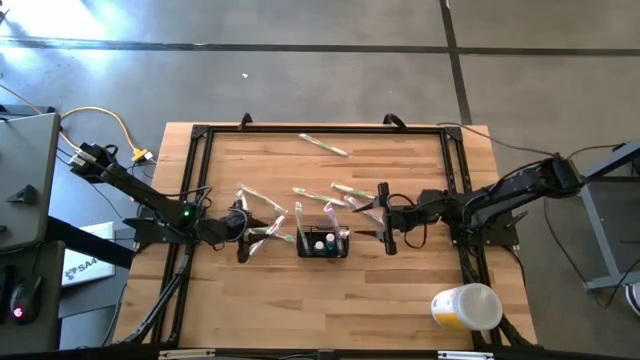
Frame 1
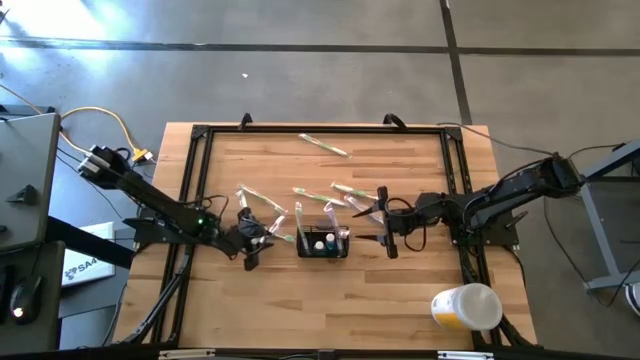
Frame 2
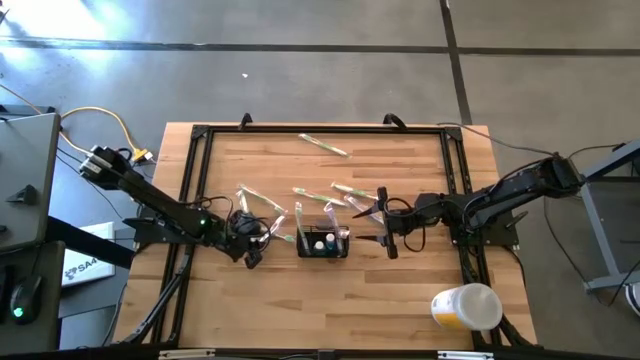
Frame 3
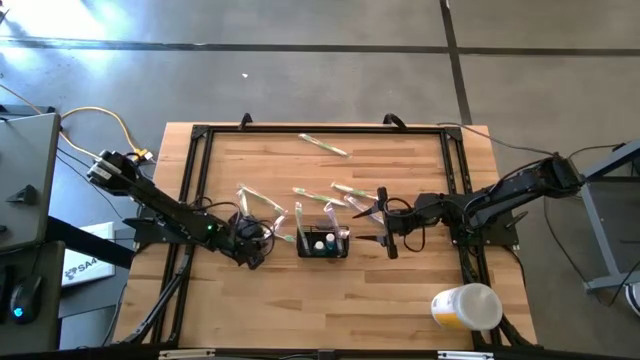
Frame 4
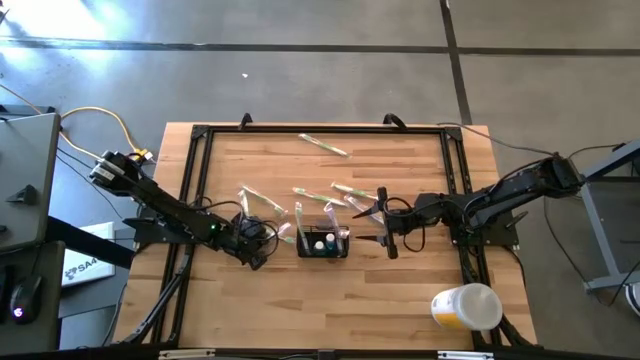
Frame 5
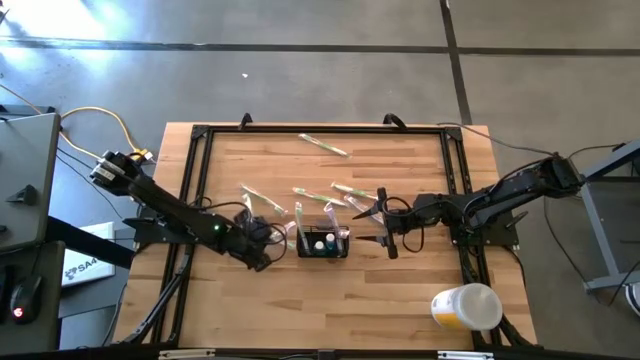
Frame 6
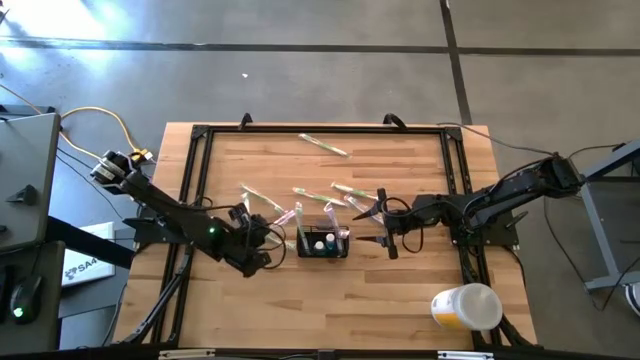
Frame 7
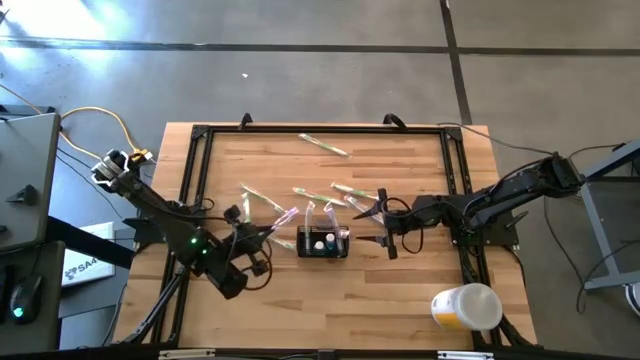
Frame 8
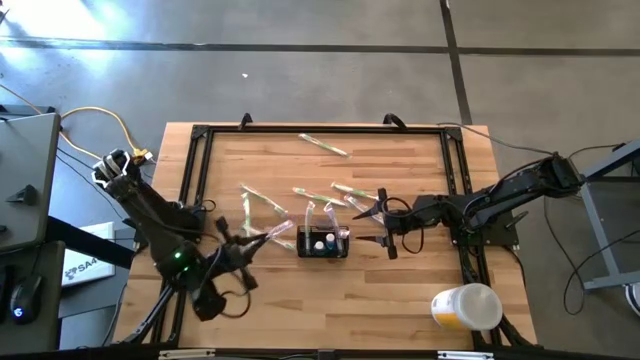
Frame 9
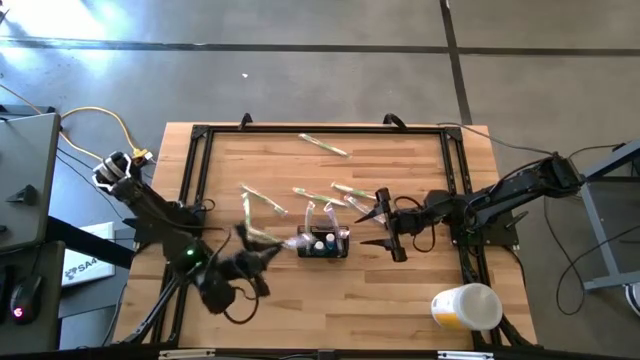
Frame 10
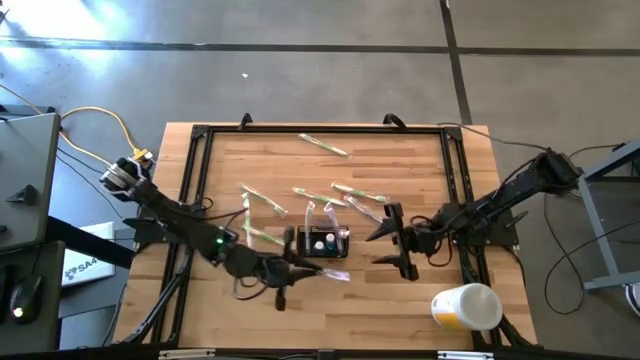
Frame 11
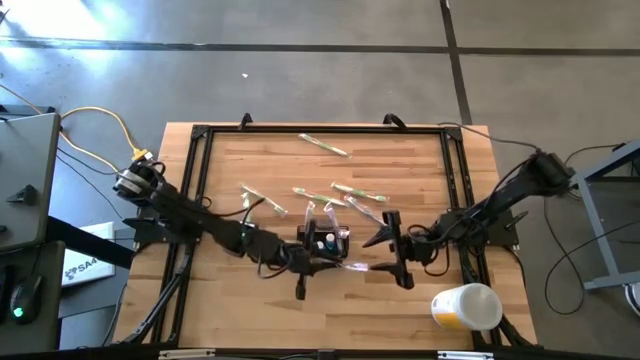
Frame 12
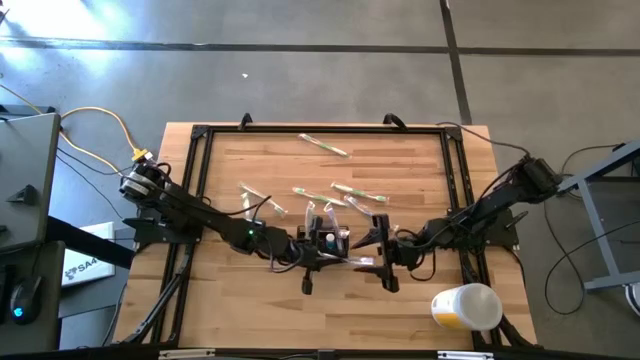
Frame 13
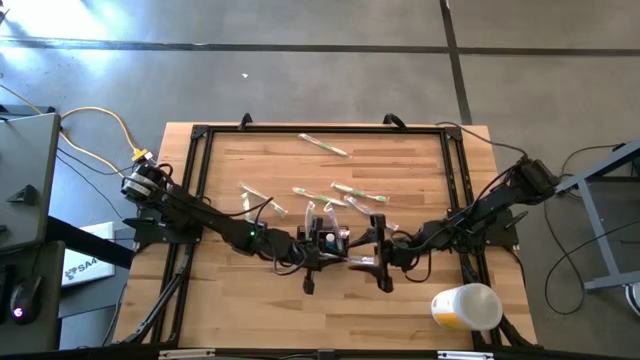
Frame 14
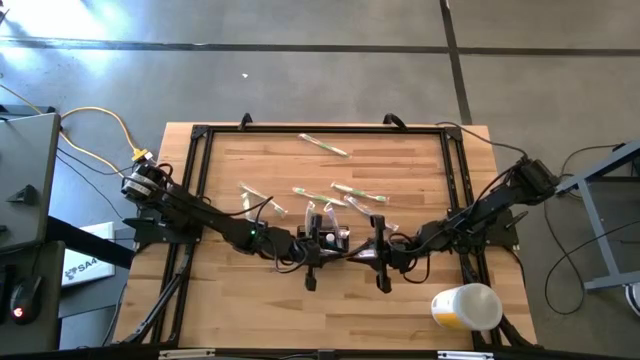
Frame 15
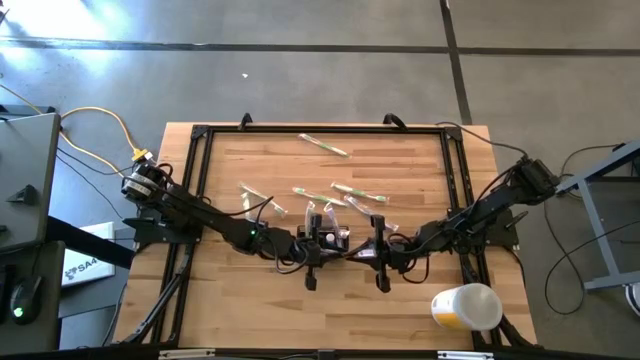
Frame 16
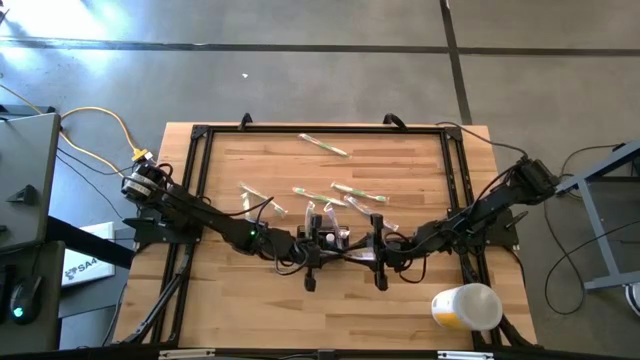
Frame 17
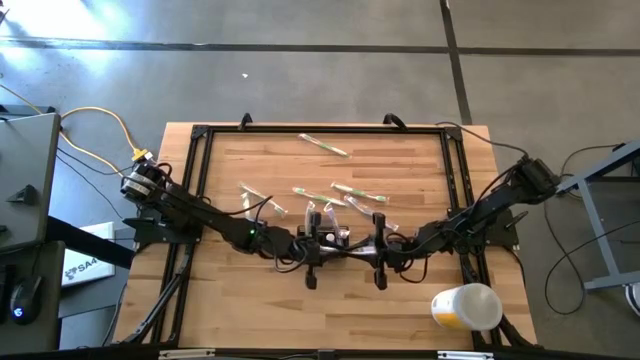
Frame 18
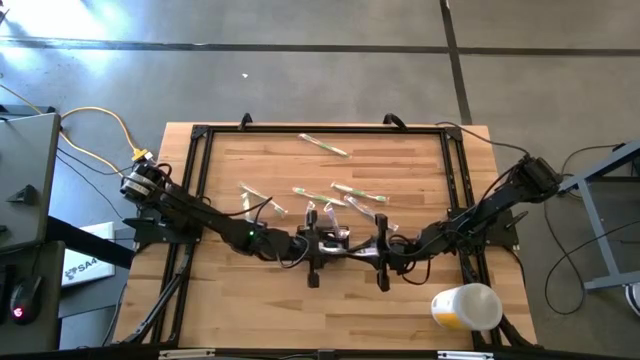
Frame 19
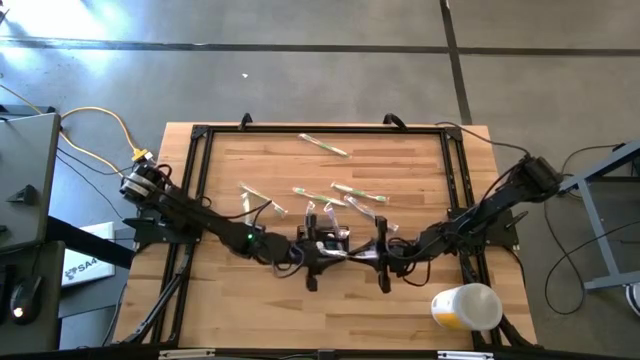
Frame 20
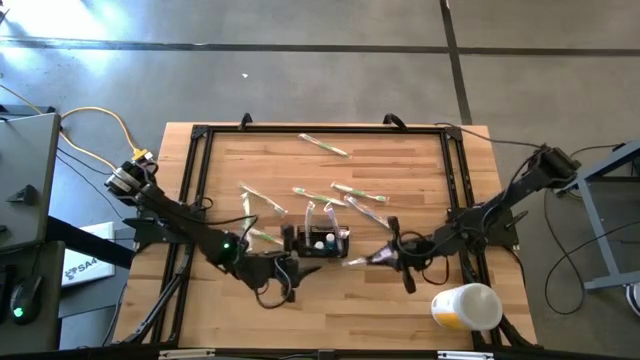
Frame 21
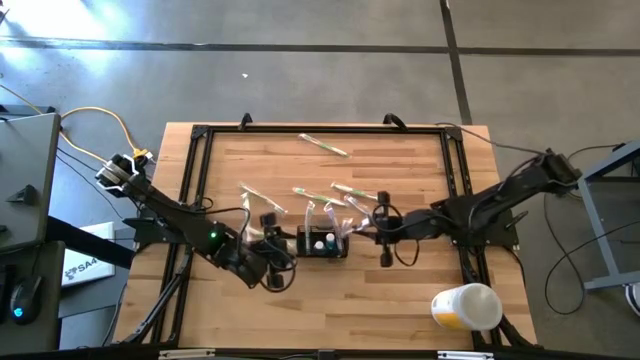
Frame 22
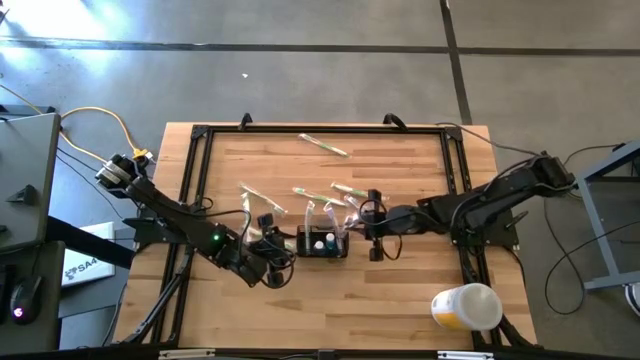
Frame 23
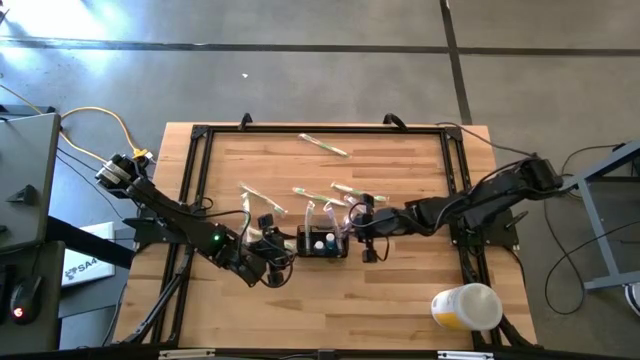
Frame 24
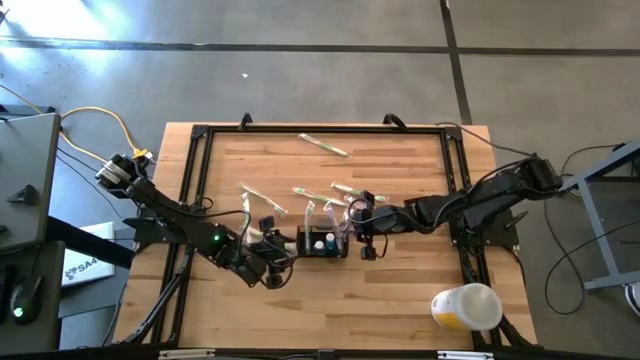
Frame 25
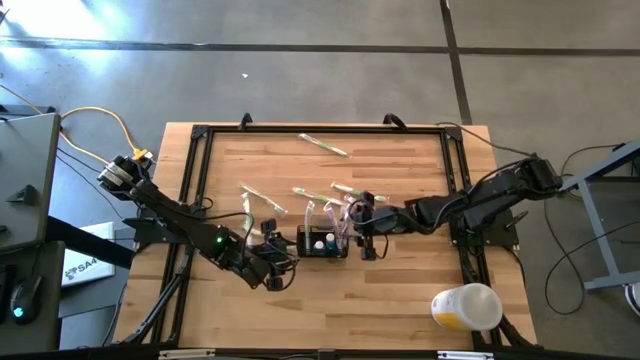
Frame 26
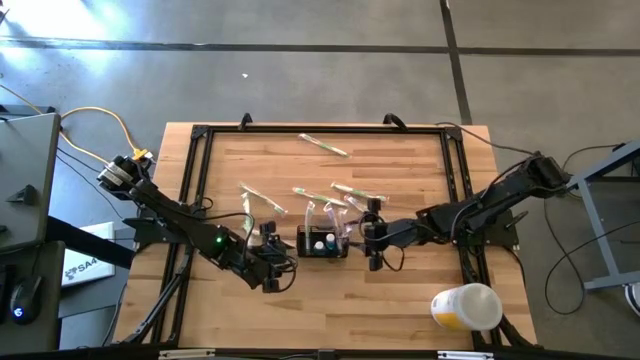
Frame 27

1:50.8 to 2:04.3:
Task: Pick & Place toothbrushing station
Put the violet toothbrush into the wire organizer

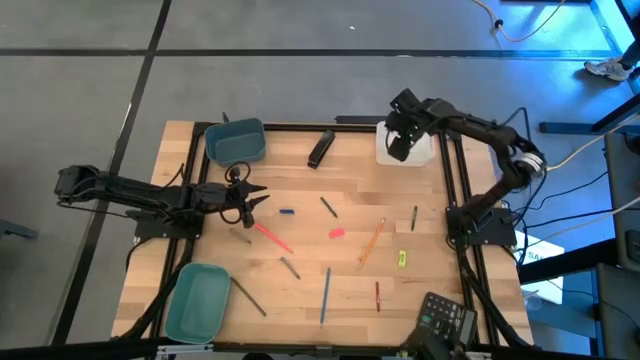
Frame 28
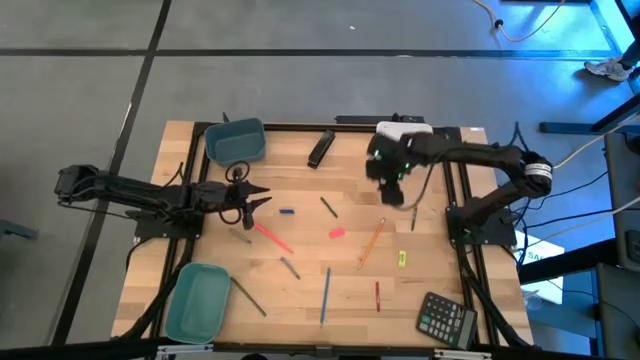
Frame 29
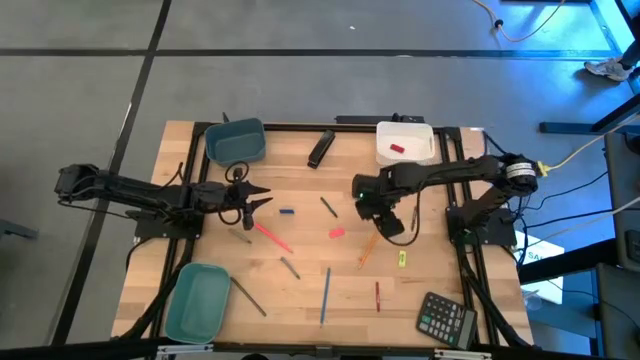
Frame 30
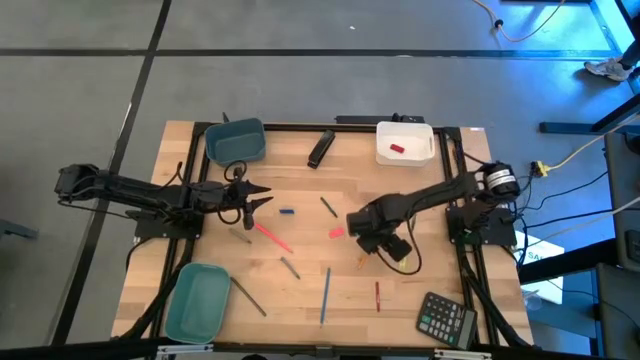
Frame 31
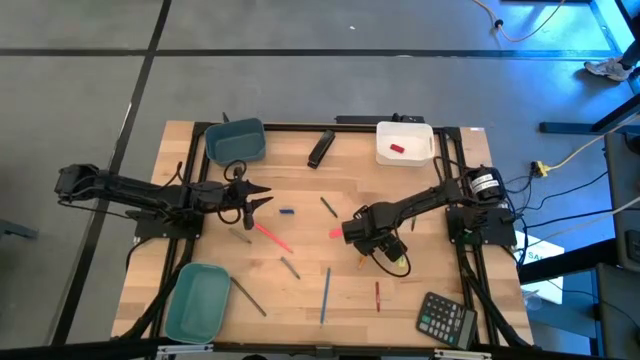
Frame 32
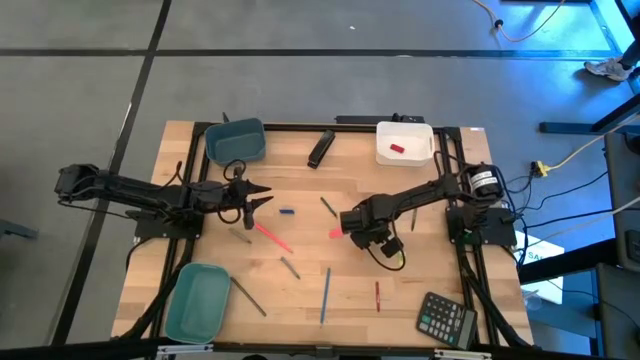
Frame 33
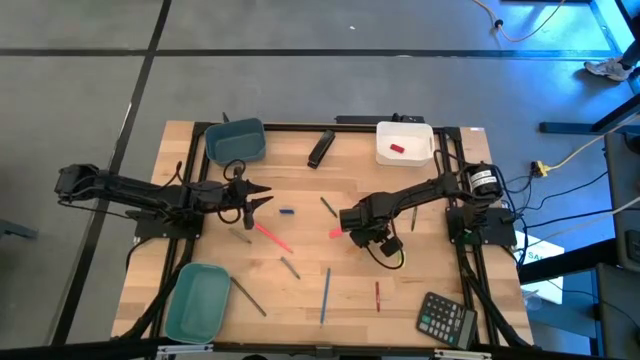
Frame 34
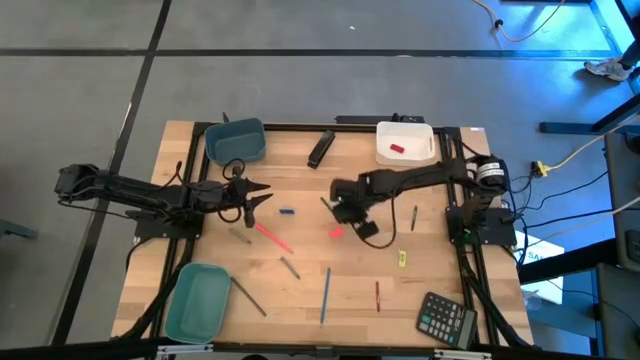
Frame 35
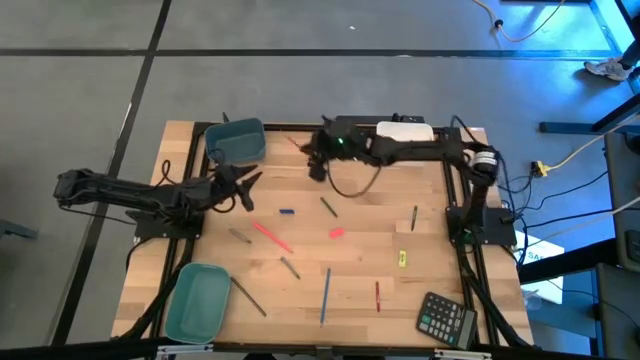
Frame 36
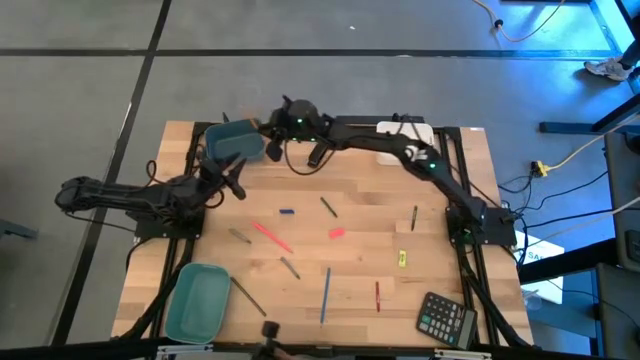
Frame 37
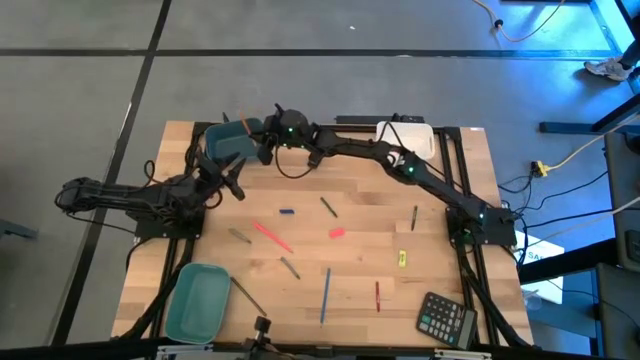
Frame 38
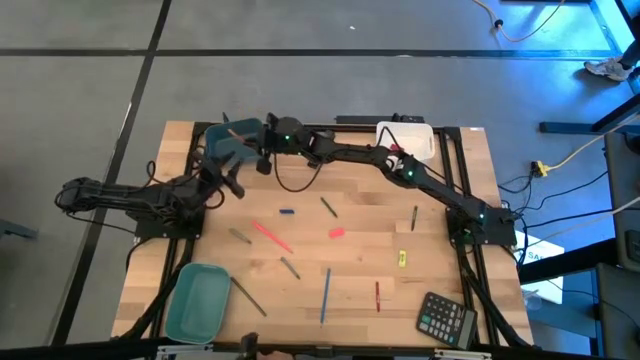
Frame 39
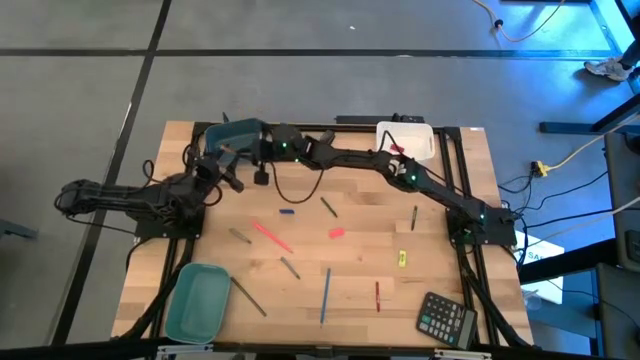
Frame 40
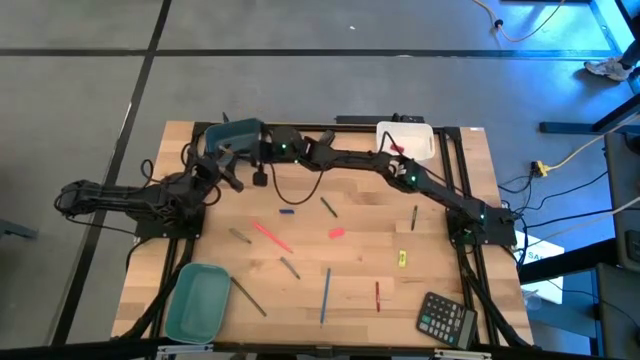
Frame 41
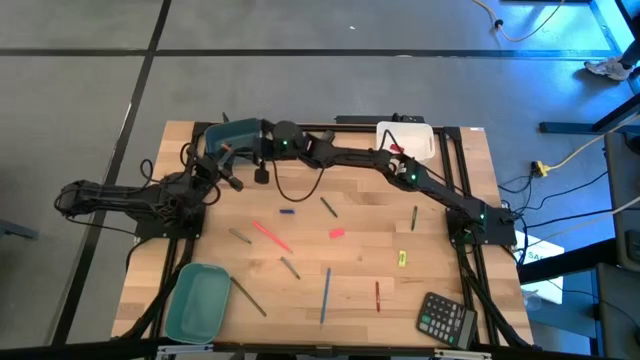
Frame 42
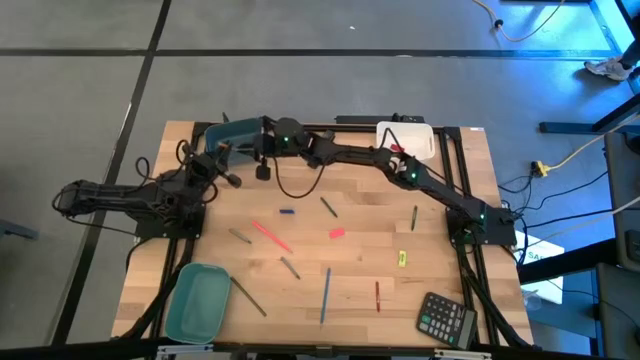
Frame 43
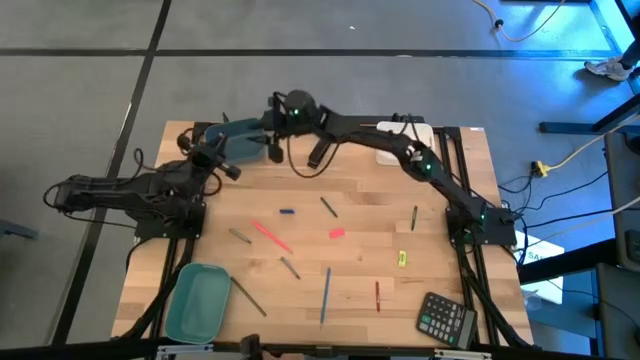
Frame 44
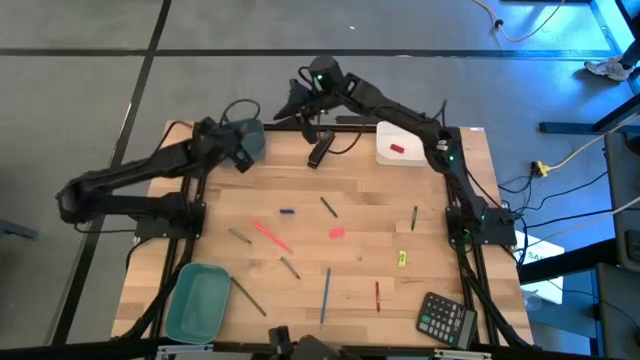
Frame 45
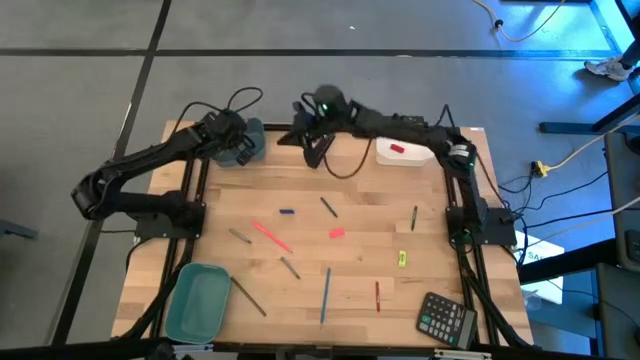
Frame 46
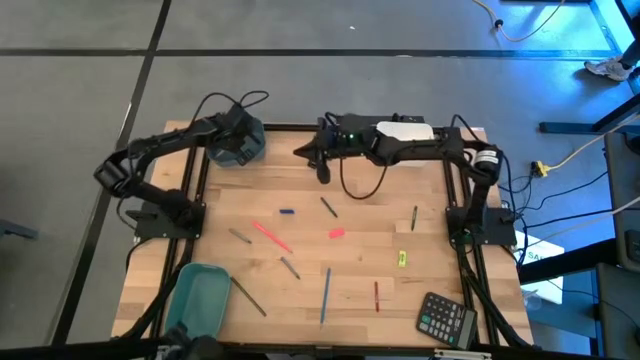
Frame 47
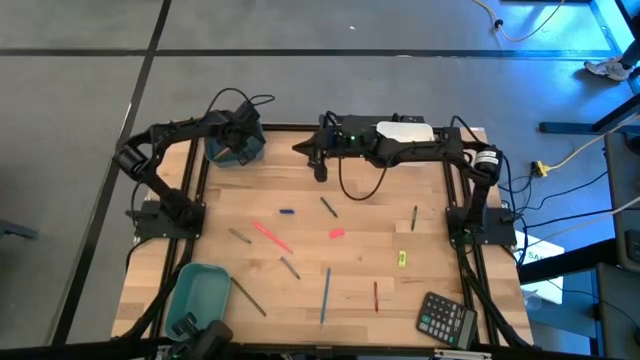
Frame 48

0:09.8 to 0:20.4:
Task: Sort crayons/erasers/pens/pencils in bins
Put the yellow pencil into the blue bin
